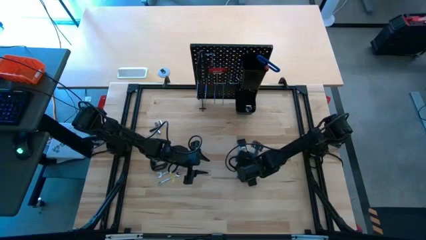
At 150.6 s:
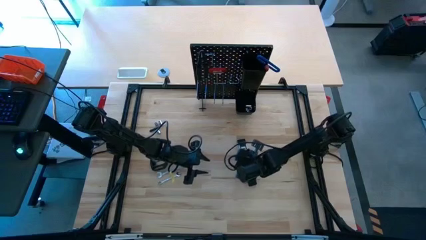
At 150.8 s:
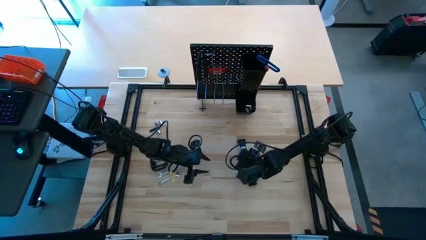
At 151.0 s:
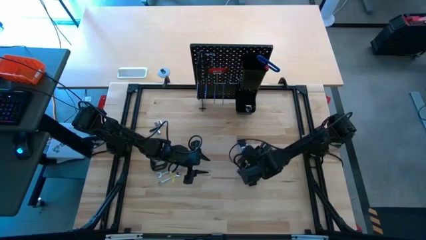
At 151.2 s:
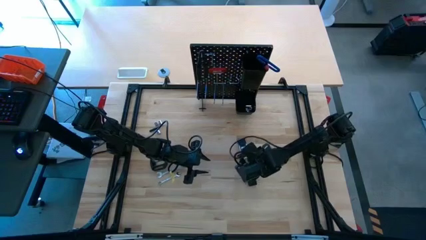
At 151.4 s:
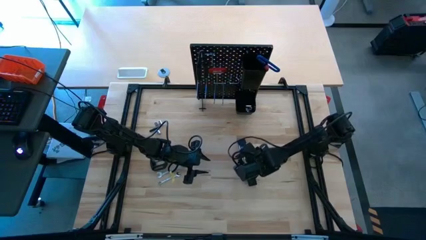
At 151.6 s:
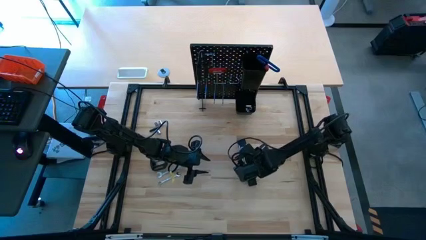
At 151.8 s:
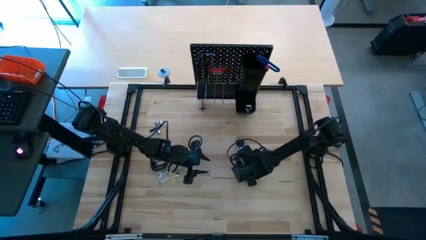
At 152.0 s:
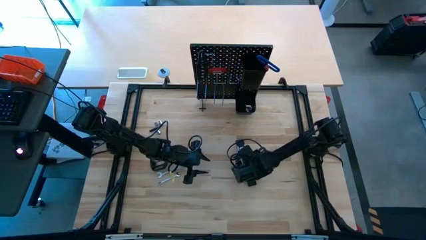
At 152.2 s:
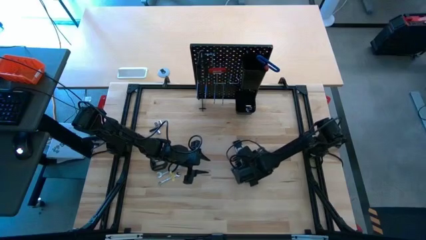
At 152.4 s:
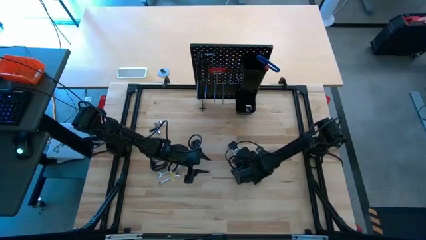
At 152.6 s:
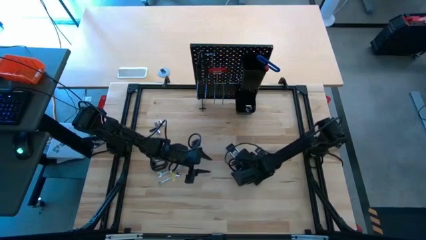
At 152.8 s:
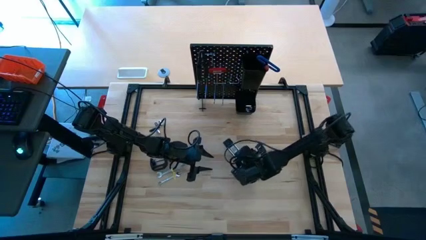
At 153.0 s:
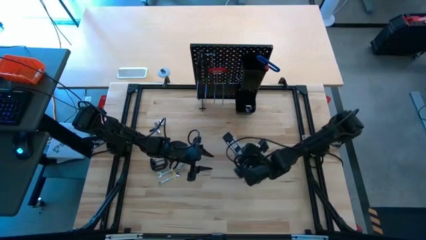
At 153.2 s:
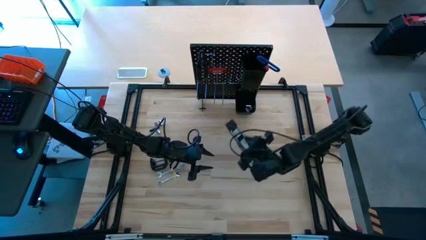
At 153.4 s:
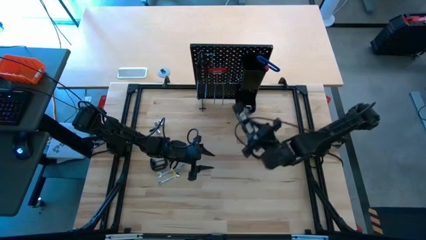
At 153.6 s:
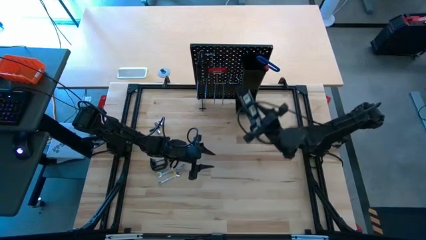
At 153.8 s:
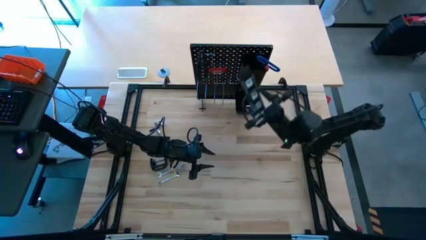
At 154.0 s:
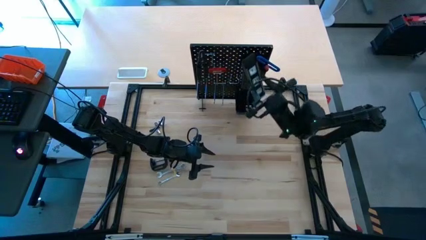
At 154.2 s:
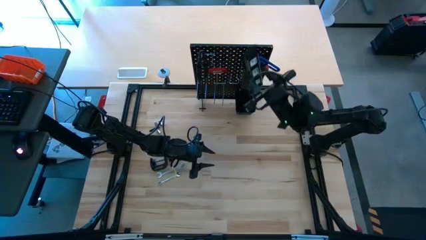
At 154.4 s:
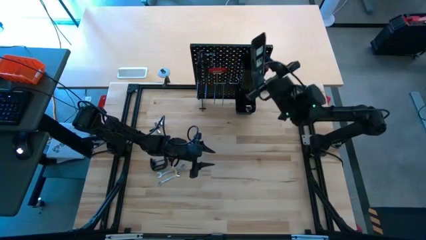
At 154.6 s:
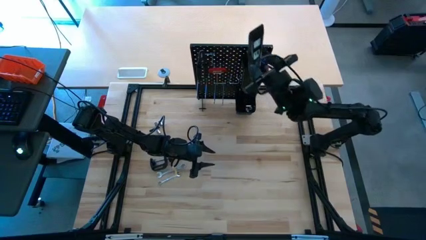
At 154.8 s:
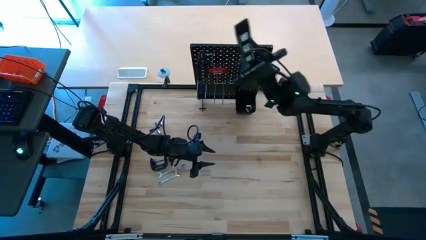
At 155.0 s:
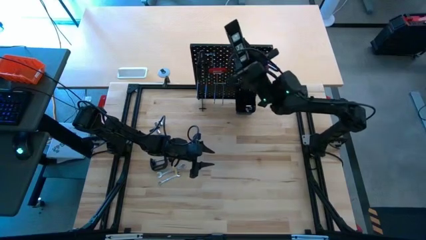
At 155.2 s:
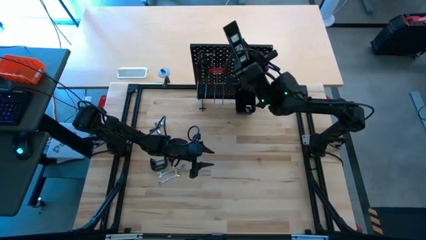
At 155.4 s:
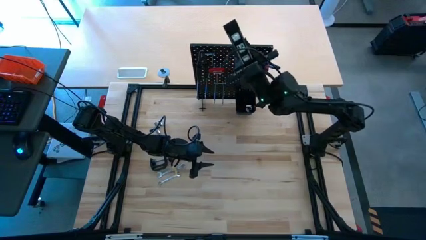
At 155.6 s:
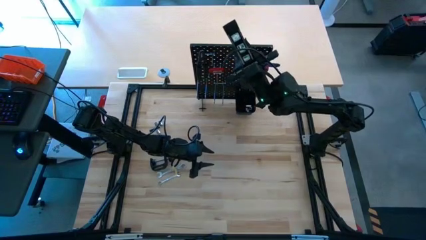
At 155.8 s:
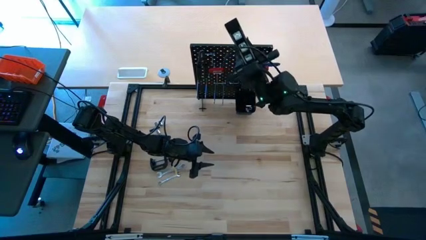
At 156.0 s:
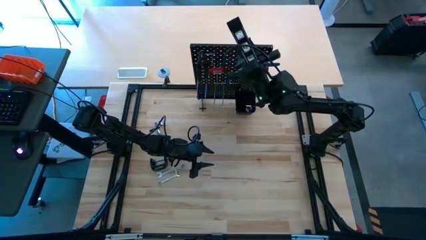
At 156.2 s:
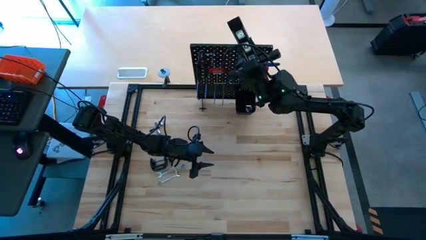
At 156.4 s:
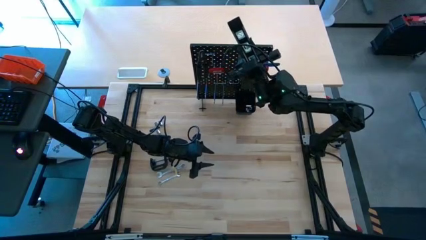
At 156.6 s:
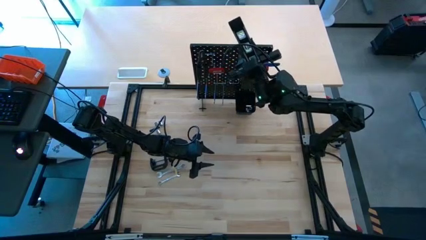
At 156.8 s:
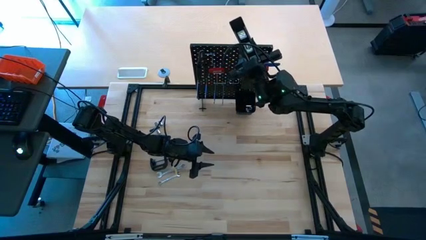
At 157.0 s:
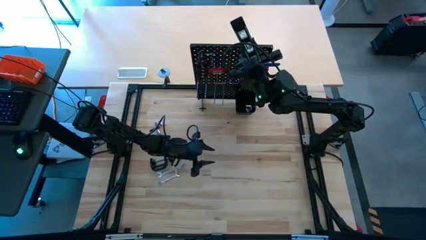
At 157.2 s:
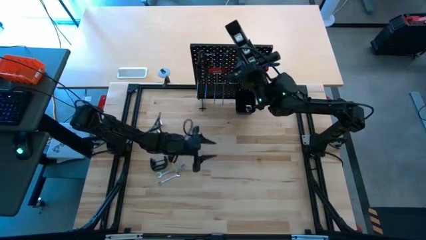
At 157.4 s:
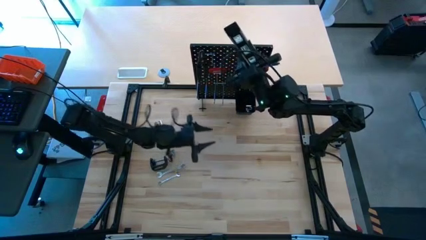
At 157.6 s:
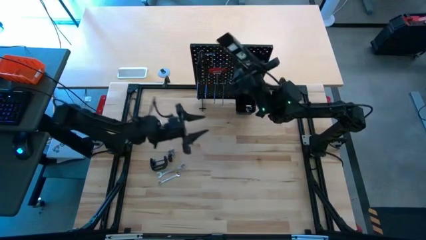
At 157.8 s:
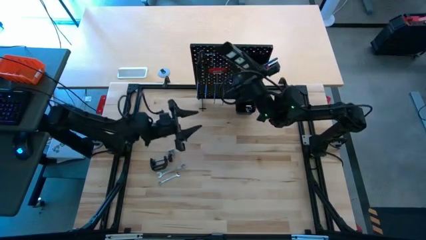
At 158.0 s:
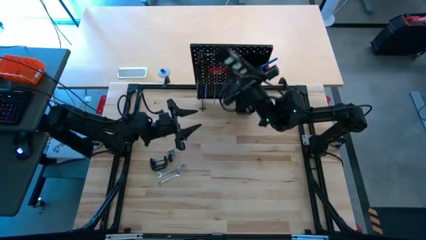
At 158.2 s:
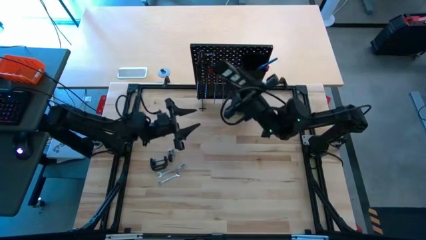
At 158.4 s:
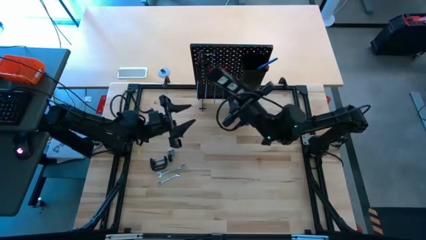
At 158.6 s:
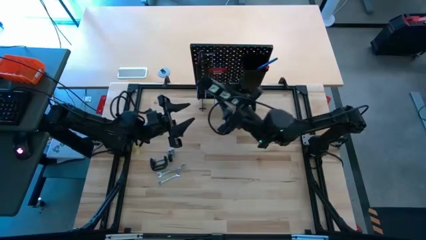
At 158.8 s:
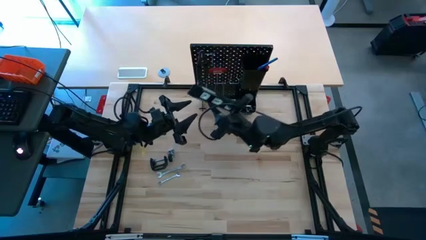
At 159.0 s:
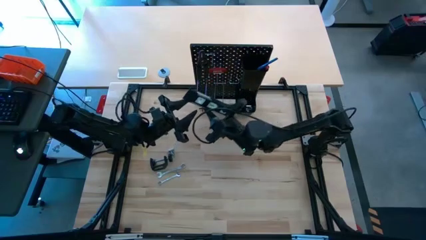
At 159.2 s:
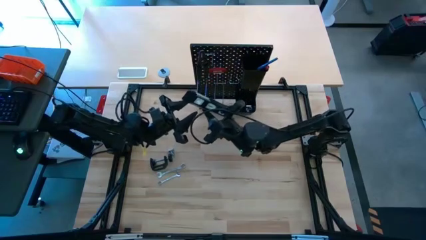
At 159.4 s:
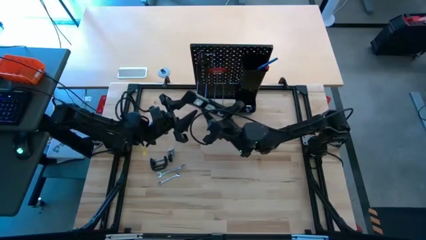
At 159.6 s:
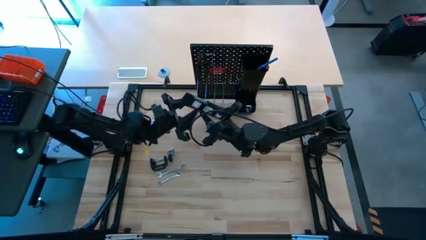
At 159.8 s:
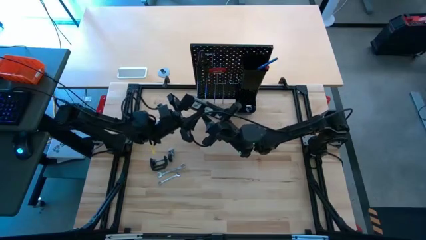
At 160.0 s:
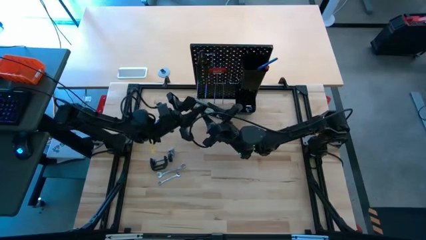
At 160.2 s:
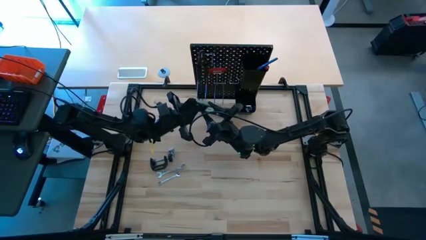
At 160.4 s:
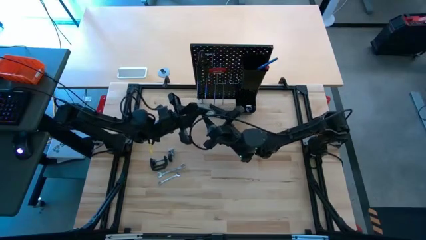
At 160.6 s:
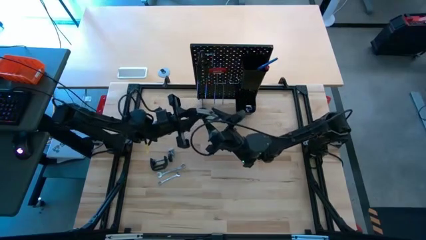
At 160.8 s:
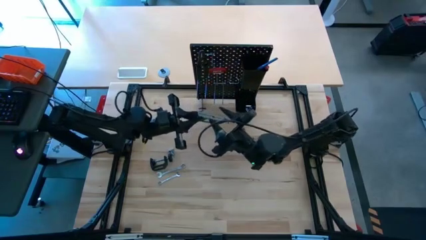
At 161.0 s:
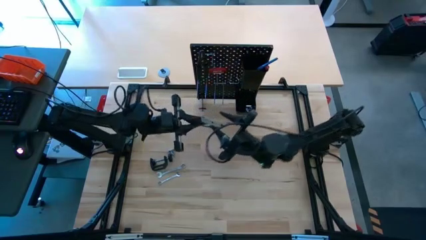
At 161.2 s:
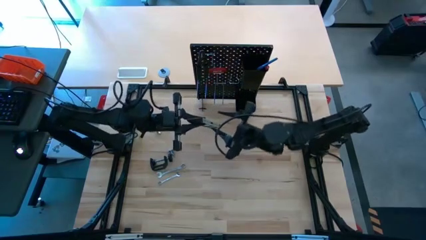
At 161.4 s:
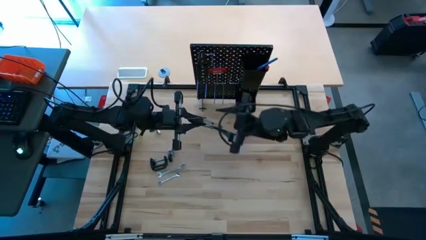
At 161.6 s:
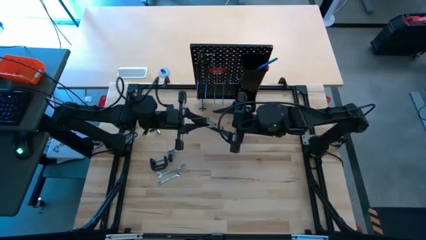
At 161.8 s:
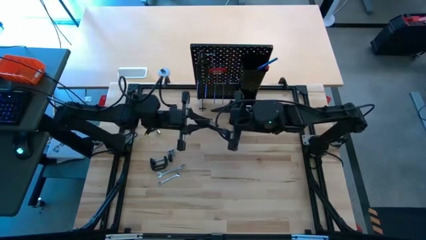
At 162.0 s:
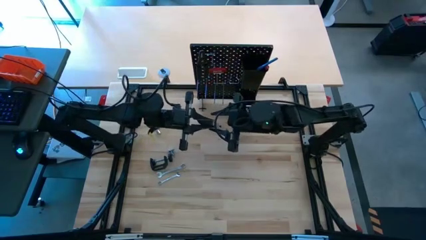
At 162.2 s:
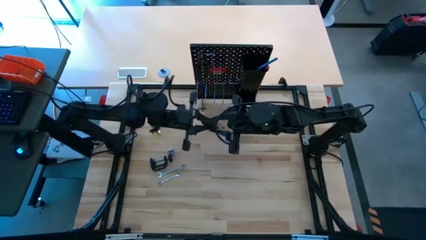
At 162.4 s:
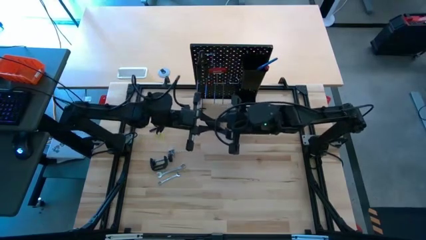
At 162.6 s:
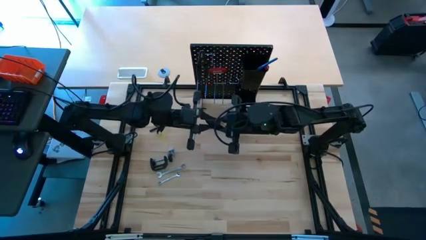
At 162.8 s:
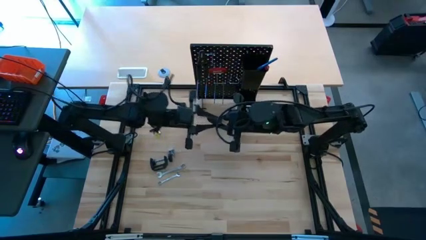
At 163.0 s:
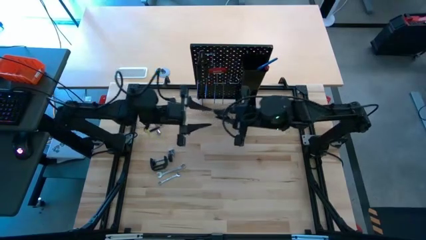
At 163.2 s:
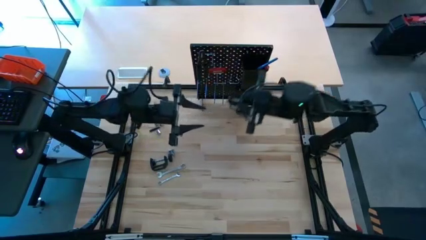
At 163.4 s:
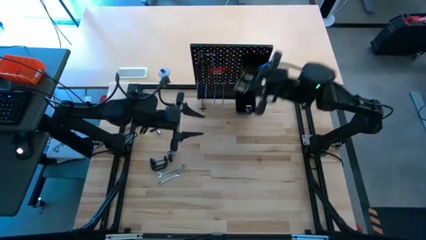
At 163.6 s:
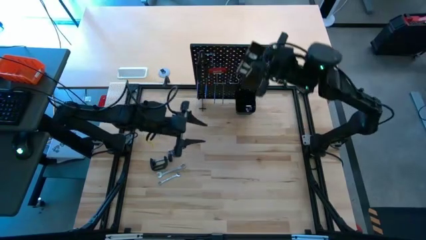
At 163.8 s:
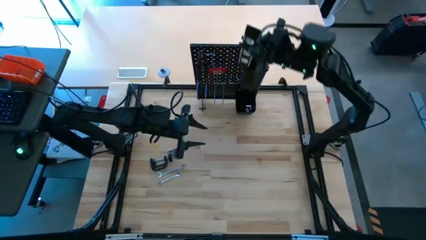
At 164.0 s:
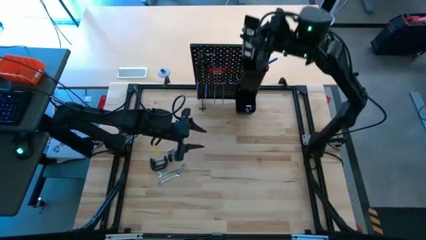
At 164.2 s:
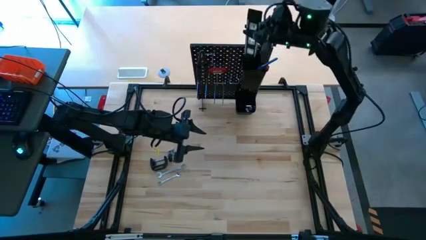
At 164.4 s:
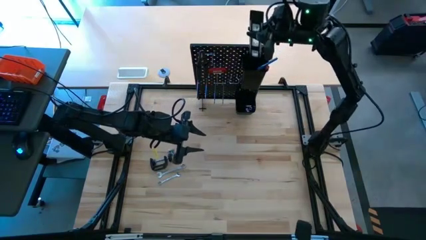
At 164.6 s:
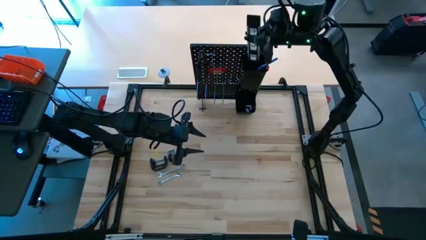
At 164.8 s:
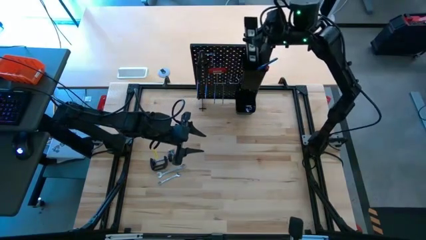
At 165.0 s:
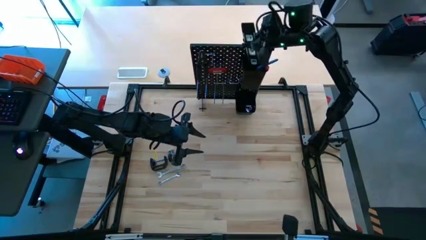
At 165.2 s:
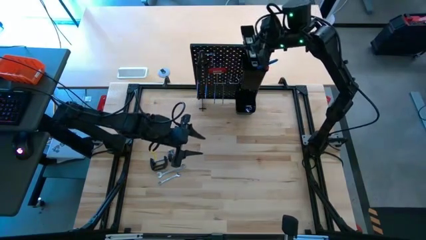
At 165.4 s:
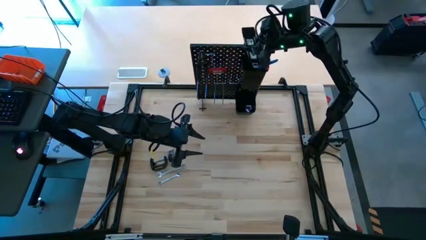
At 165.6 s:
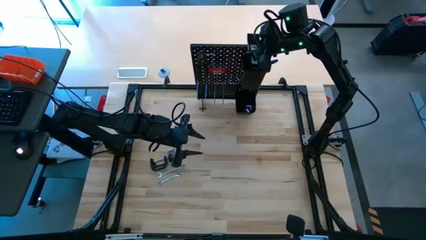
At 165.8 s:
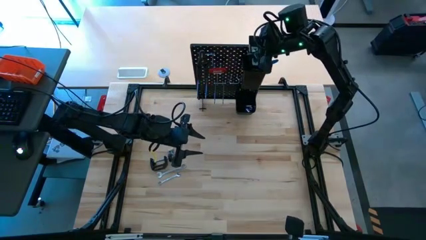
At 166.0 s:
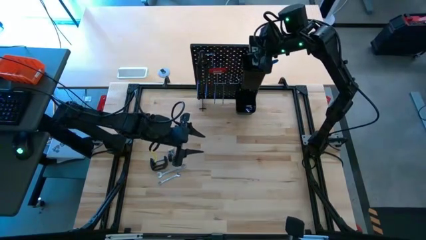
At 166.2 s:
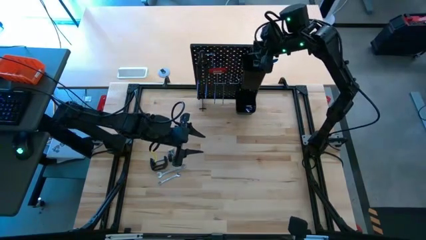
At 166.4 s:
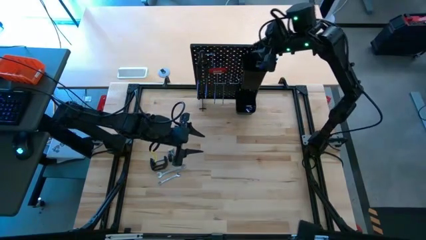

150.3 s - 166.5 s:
Task: Hang tools onto peg board
Put the spirit level into the top black bin on the peg board

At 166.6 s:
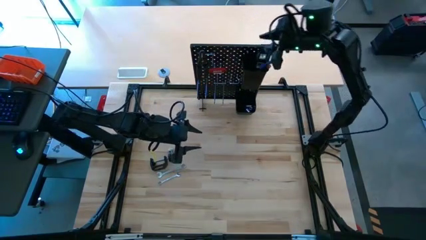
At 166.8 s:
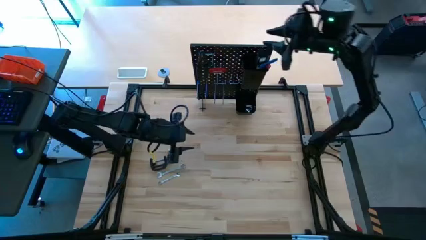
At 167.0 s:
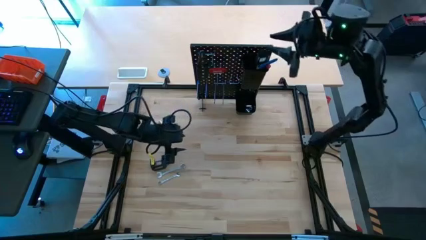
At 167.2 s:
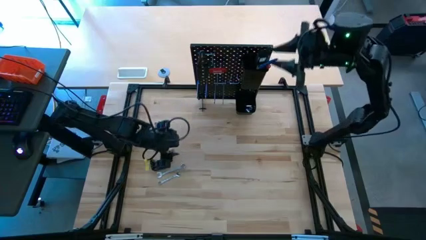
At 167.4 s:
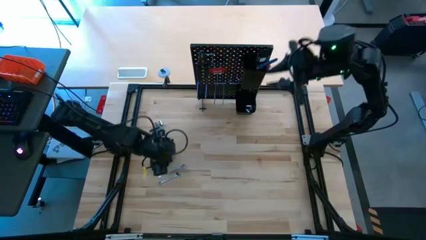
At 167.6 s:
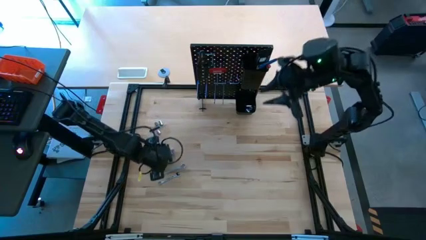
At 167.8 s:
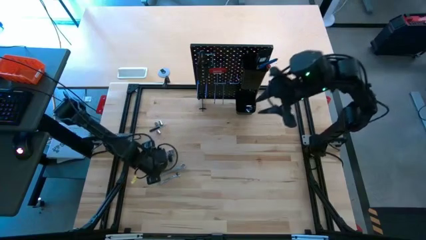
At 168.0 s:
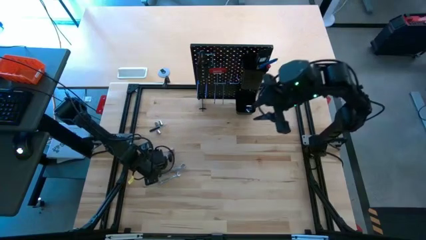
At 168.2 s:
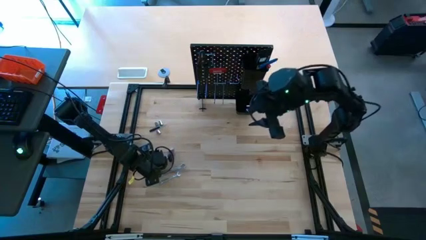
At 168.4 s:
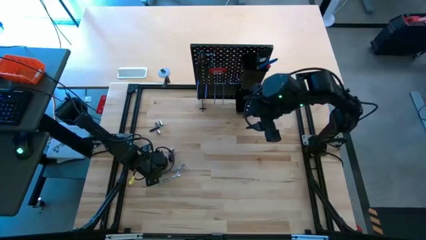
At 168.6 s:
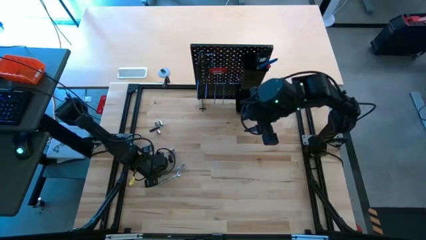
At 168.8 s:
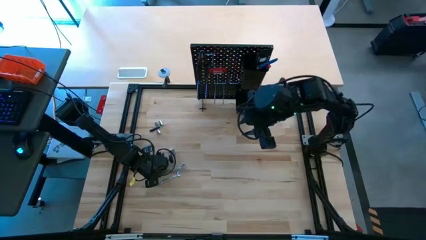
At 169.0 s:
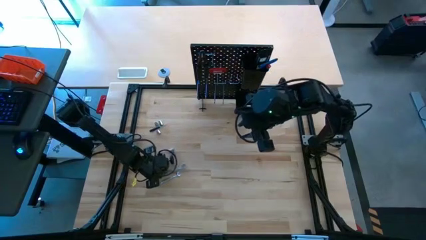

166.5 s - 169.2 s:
Hang the c-clamp on the peg board
